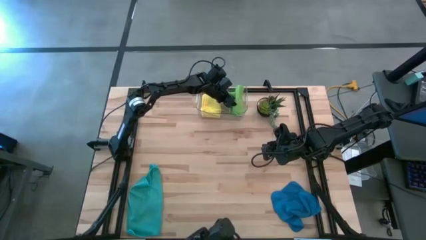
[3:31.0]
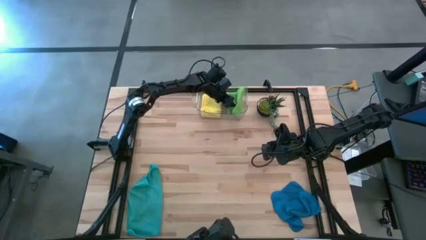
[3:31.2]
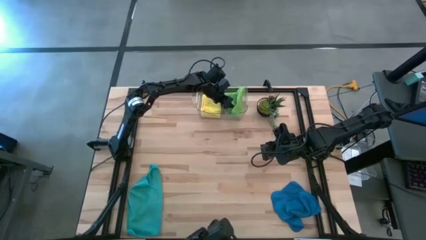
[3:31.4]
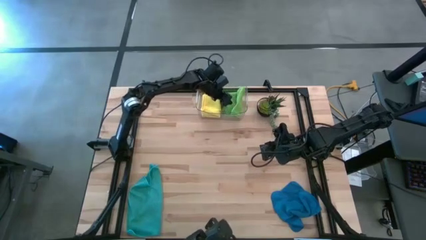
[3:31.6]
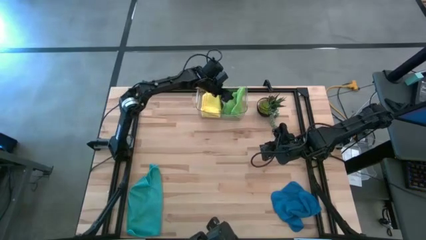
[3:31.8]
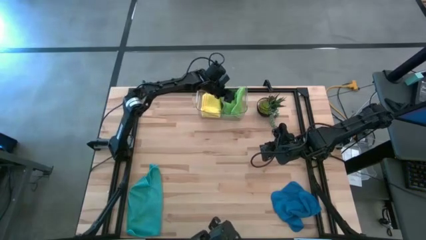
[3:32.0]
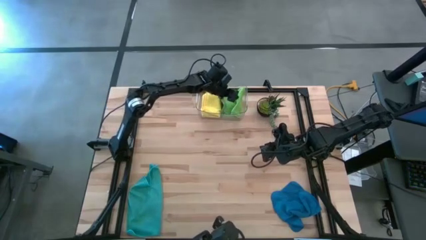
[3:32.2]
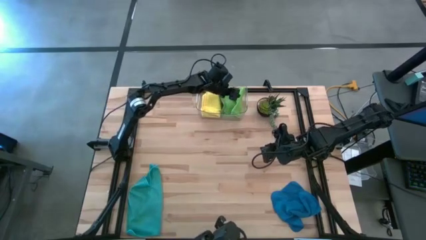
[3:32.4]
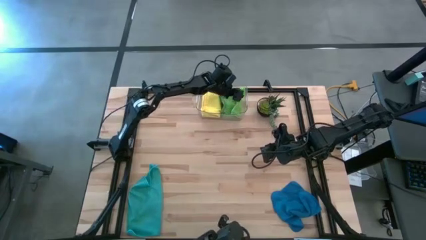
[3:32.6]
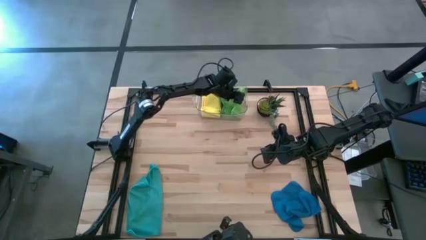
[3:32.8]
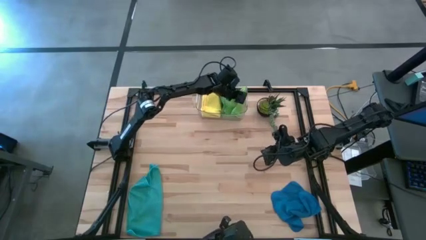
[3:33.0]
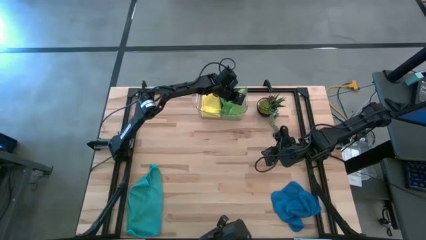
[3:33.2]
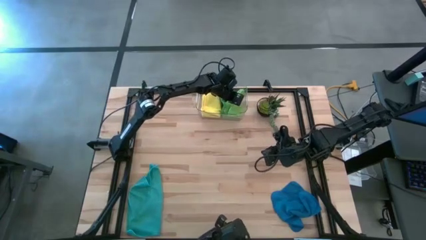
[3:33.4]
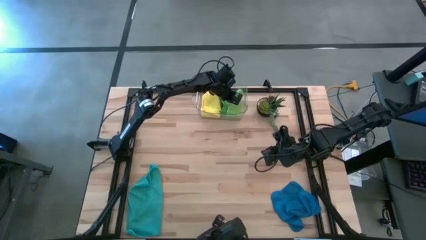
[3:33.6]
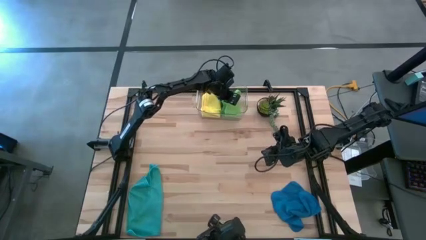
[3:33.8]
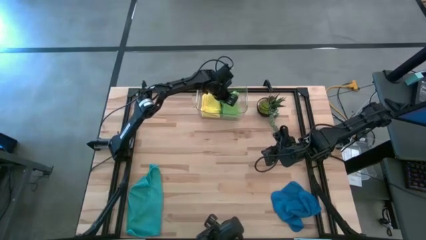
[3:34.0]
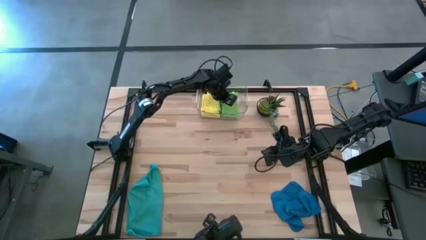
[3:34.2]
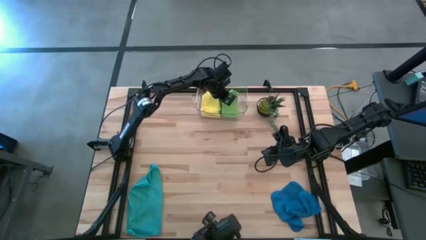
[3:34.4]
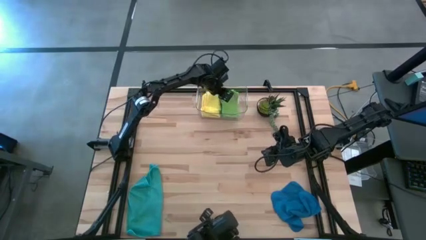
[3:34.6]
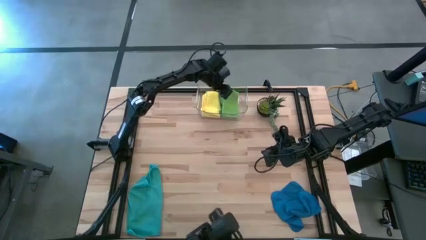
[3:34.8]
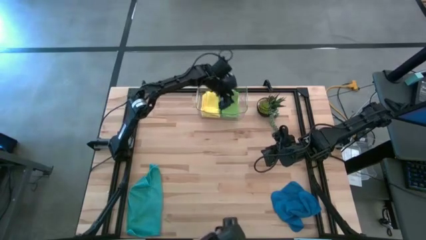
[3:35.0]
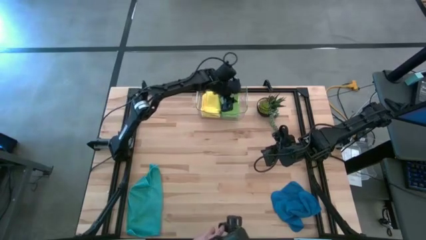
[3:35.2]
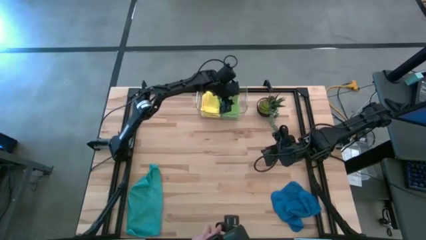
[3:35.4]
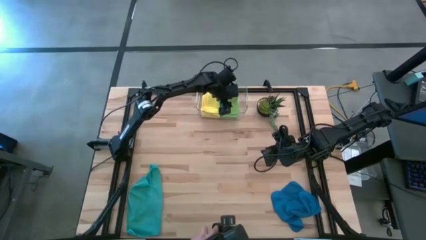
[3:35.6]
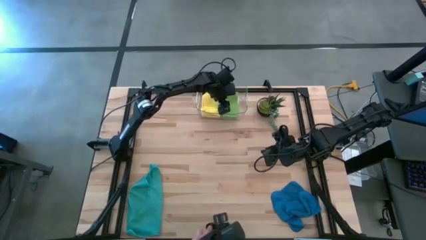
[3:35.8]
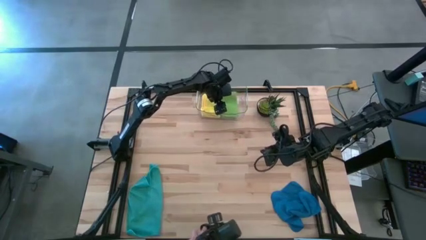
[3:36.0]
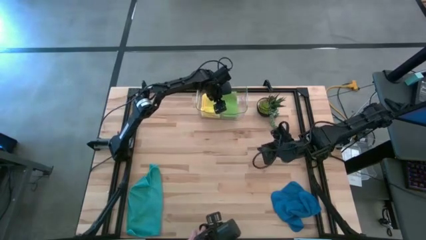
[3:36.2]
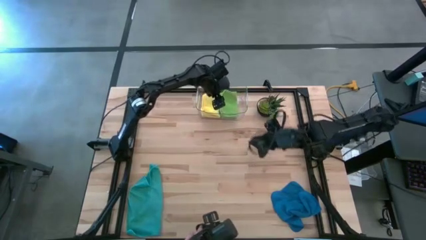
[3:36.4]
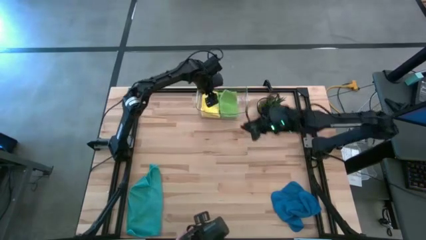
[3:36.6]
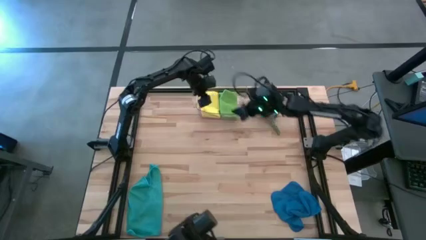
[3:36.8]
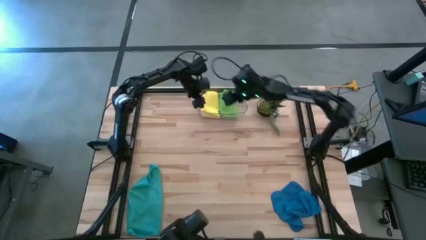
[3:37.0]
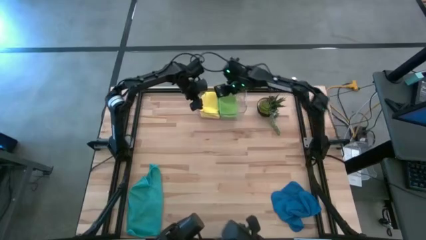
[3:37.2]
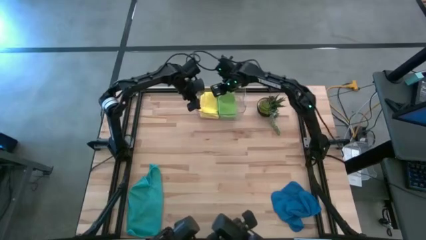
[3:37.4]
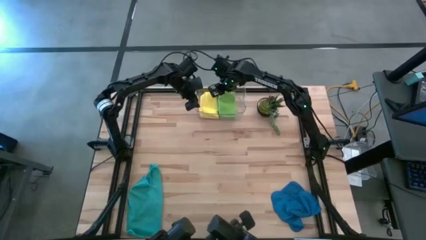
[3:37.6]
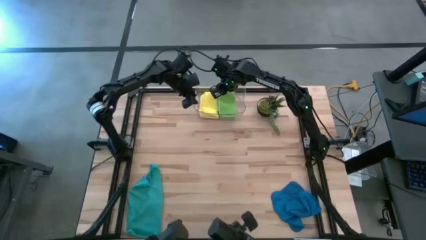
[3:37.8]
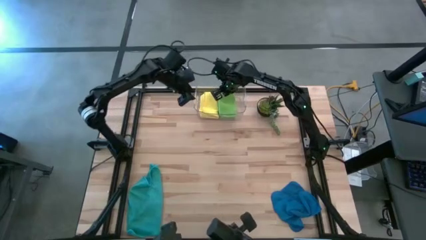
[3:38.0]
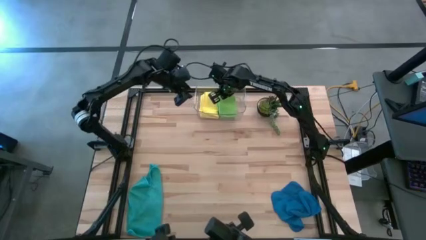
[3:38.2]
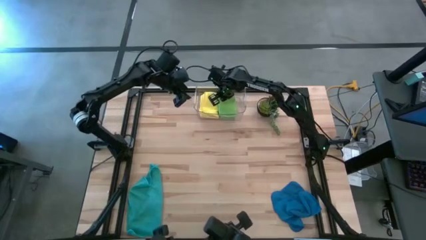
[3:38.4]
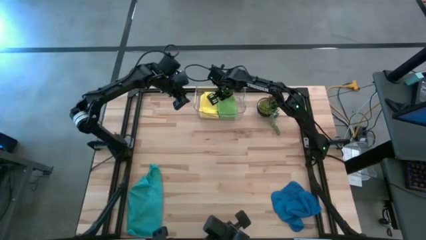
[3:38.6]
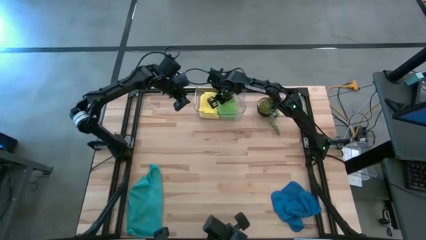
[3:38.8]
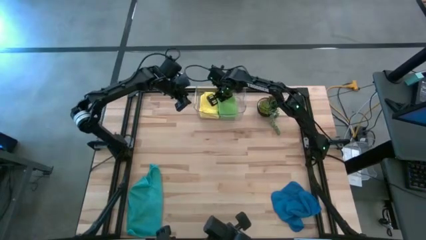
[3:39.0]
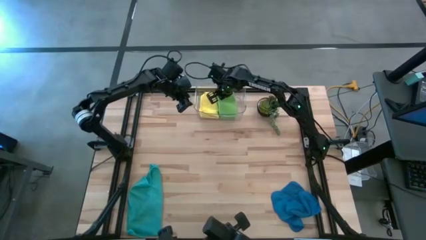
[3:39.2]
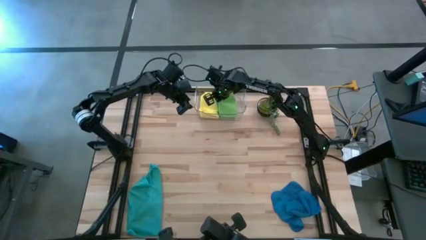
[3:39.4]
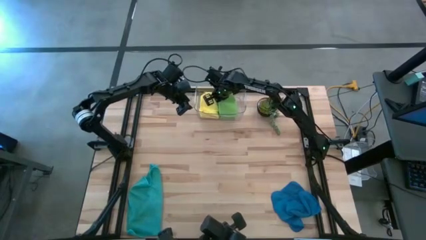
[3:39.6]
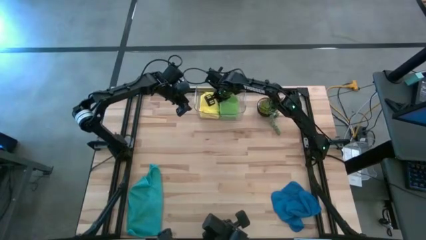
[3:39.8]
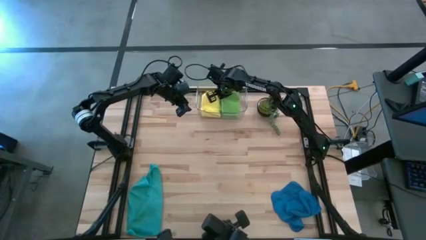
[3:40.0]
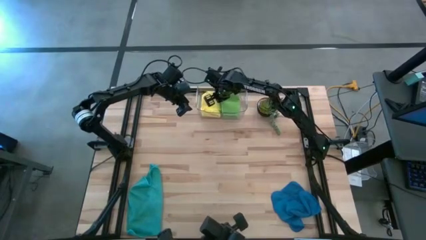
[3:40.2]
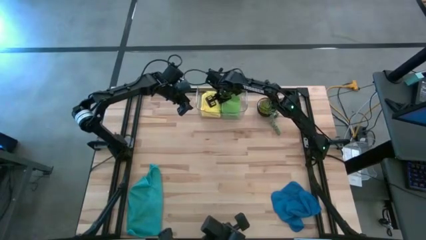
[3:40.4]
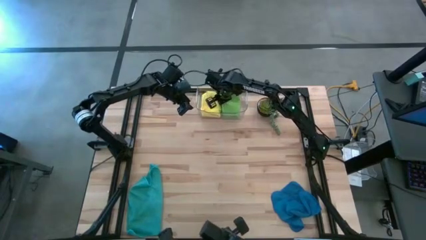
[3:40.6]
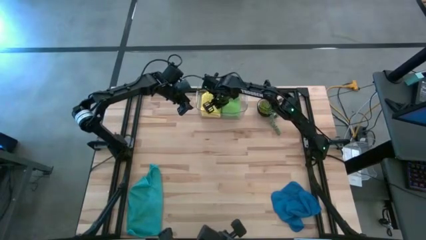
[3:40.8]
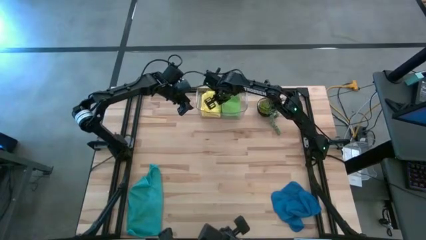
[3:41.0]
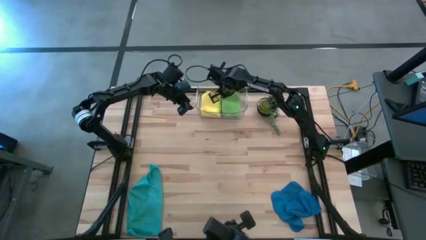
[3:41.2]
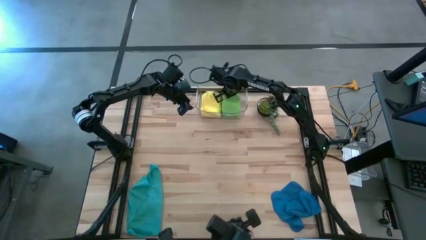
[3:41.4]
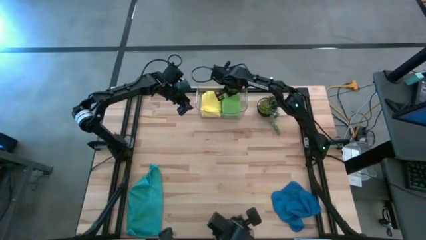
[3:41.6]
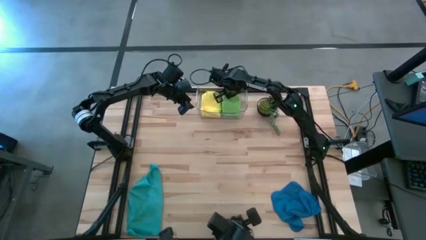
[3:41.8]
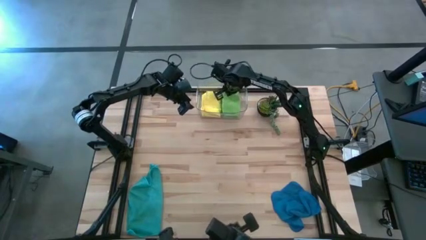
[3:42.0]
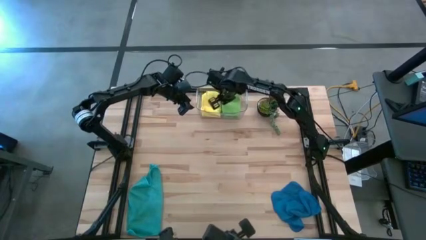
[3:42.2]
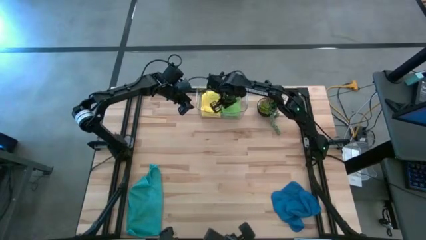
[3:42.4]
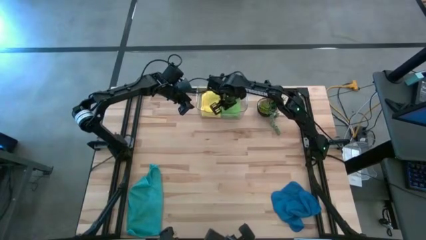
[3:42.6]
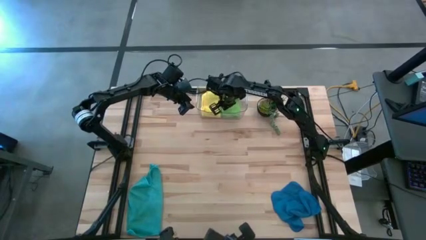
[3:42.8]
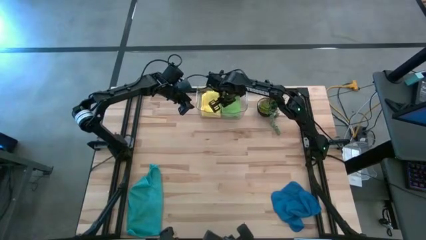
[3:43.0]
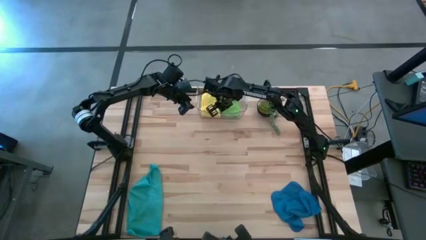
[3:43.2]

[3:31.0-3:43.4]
Task: Fold microfiber towels
Put the green microfiber towel into the transparent bin

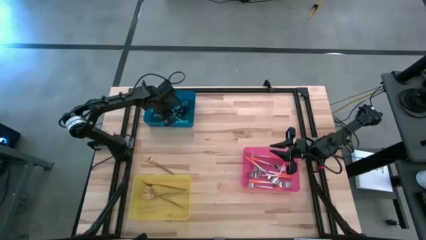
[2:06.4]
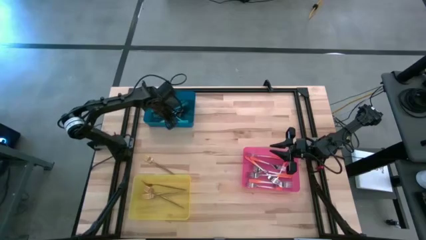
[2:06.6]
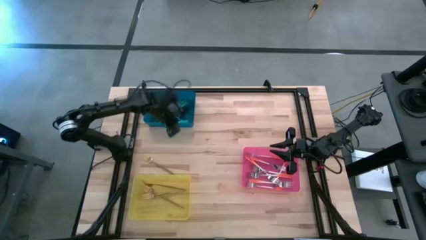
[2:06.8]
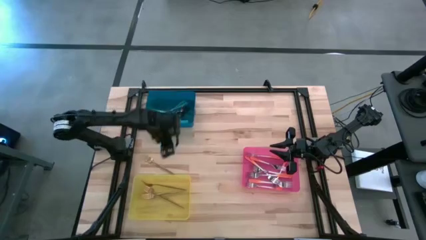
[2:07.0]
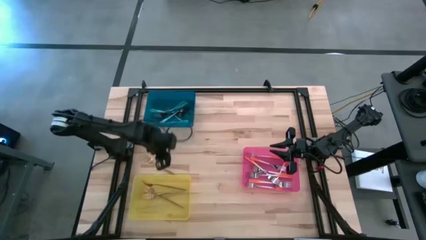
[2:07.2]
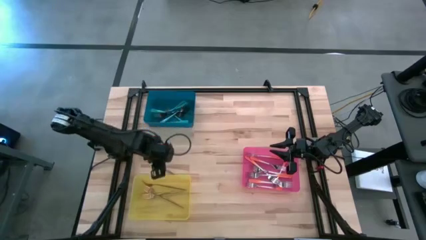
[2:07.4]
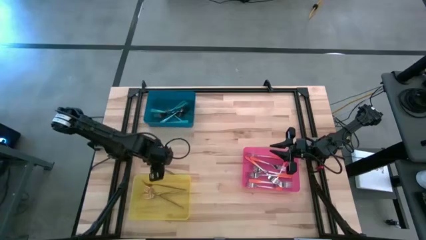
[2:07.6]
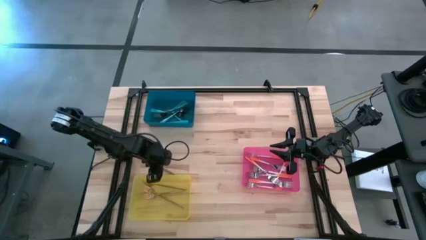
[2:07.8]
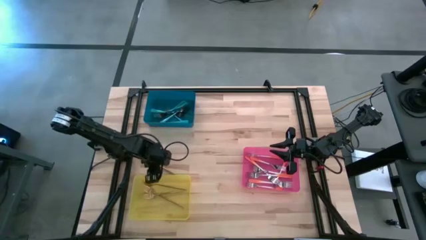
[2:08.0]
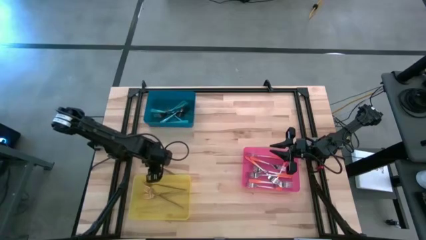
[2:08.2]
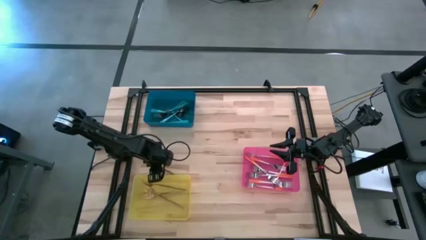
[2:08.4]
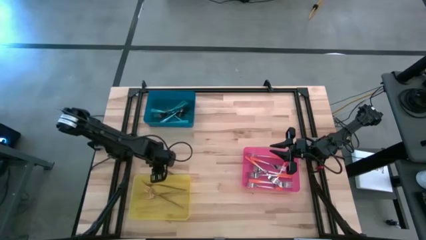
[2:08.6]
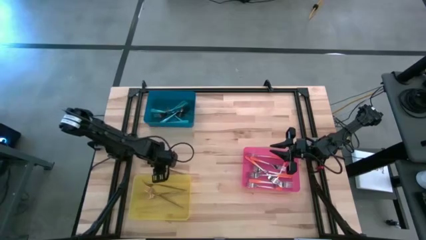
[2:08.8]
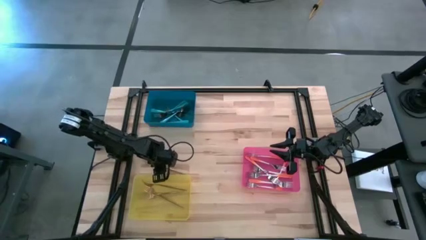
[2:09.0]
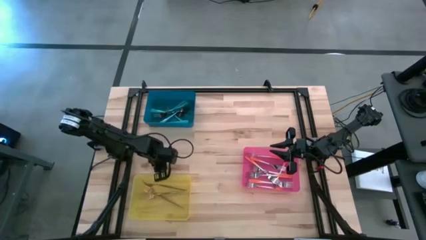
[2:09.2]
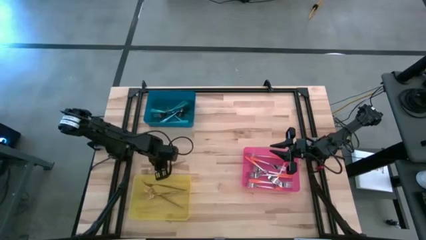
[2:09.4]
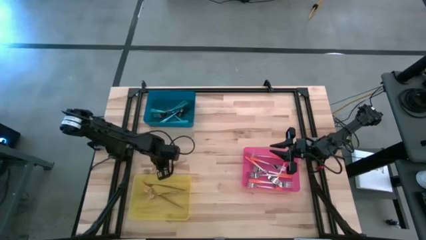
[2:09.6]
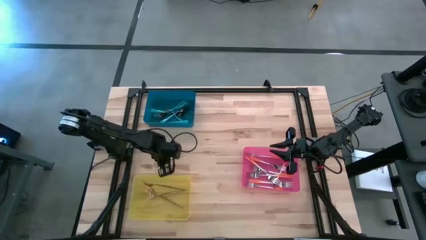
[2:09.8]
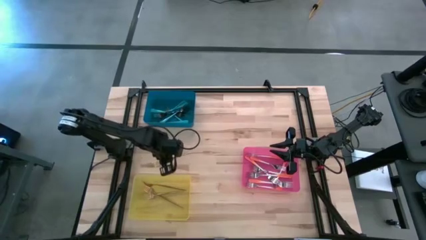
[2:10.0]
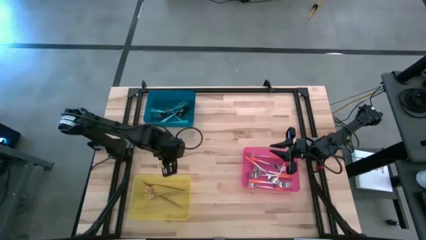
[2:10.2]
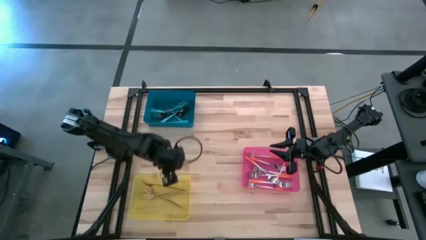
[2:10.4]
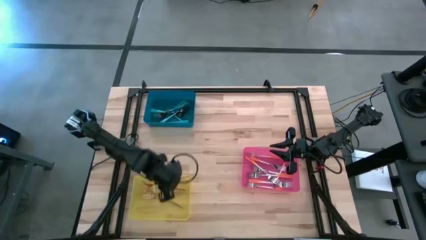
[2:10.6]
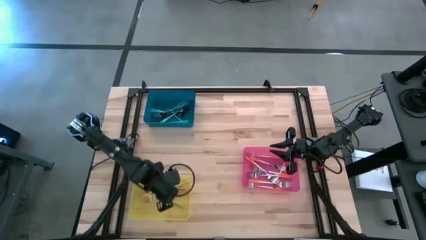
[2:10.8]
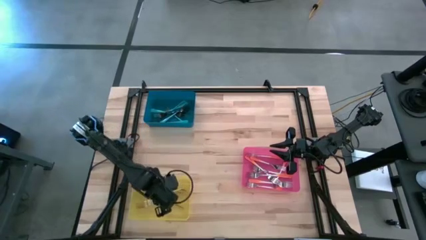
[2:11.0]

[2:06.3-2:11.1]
Task: Sort silverware by color (type)
Put the gold fork into the yellow bin
